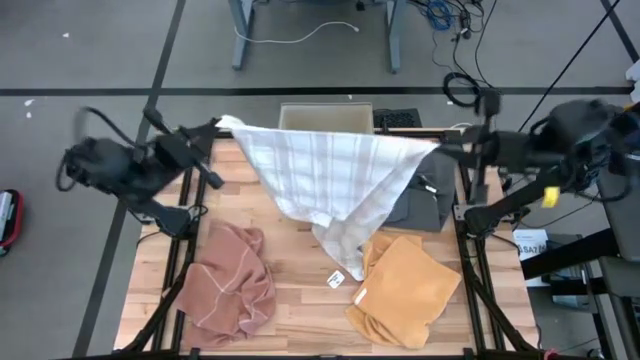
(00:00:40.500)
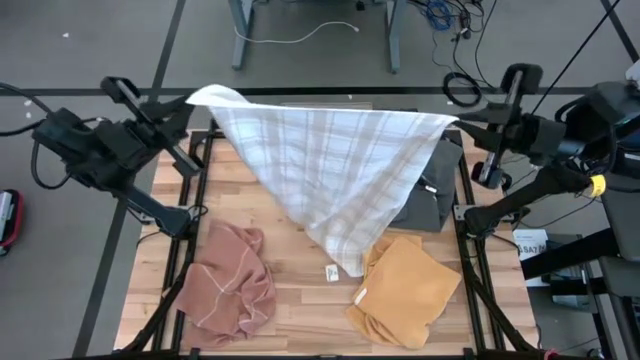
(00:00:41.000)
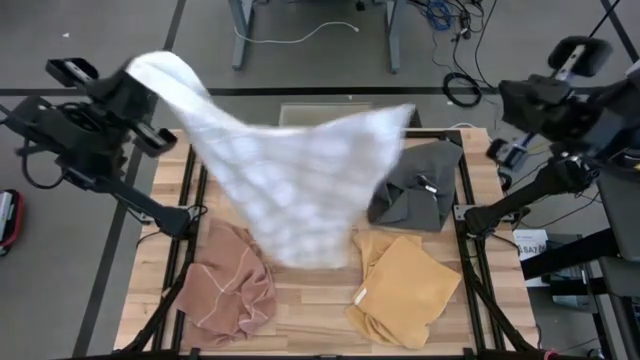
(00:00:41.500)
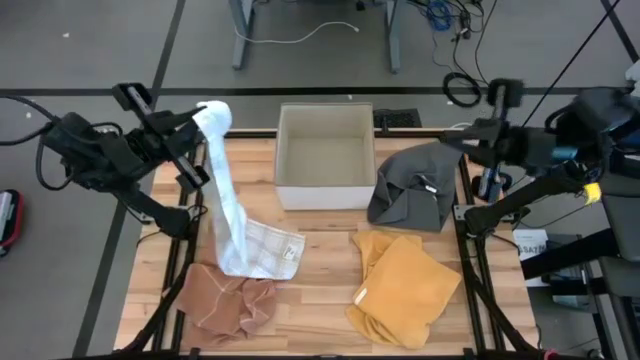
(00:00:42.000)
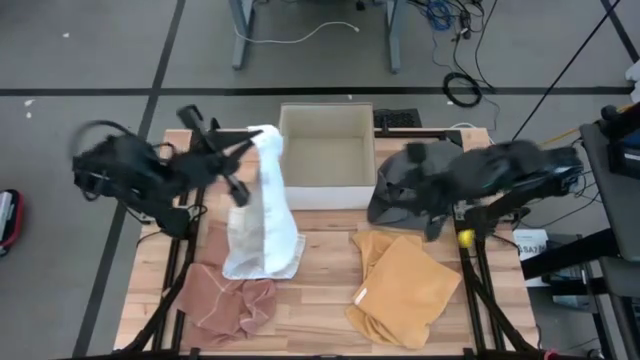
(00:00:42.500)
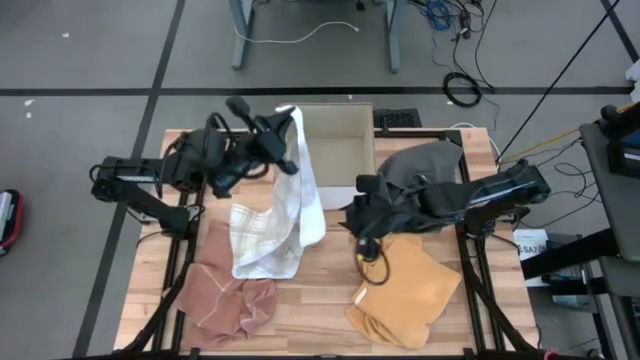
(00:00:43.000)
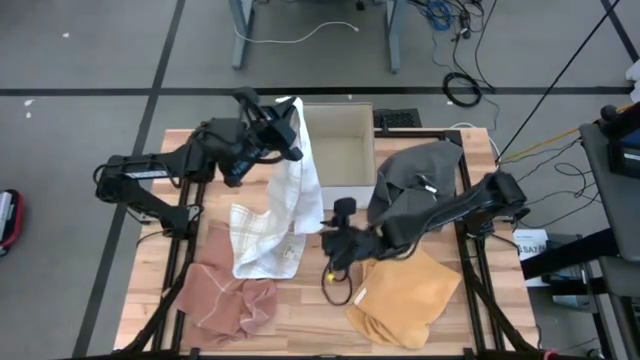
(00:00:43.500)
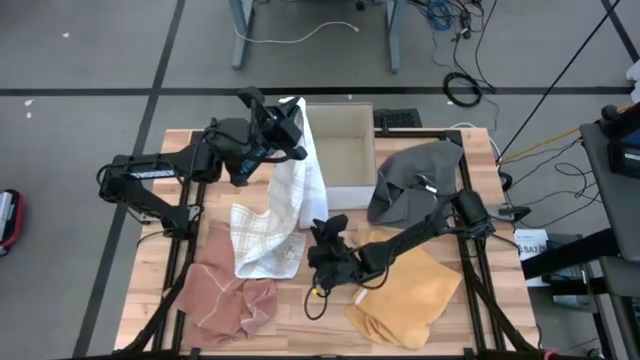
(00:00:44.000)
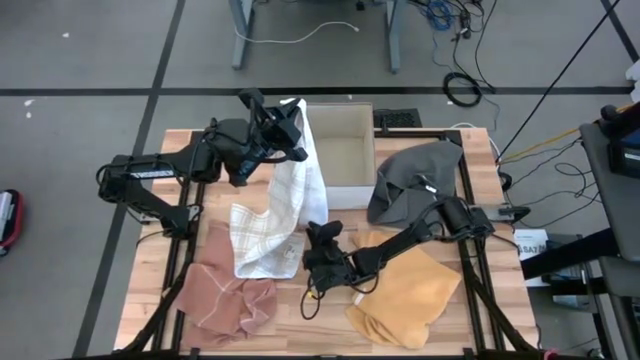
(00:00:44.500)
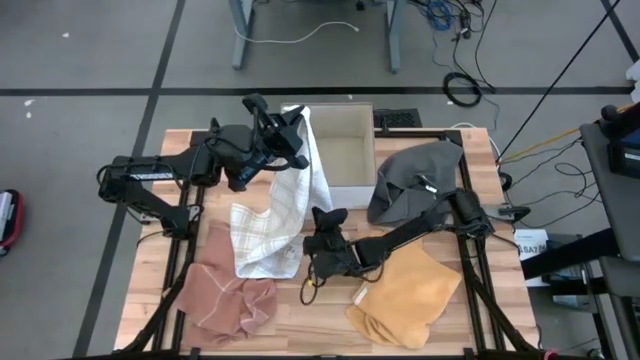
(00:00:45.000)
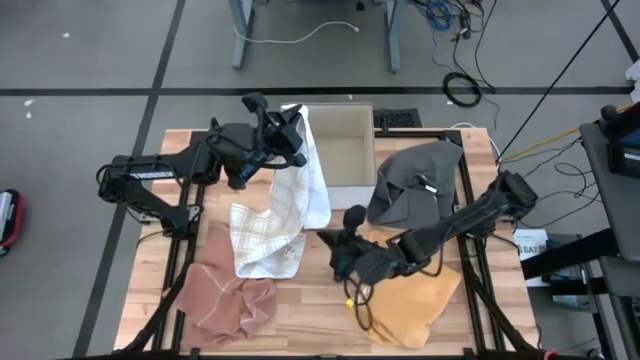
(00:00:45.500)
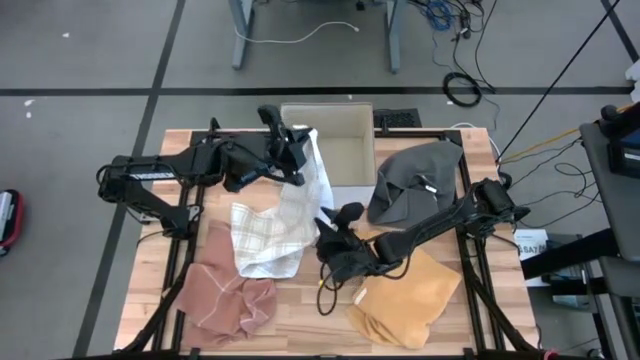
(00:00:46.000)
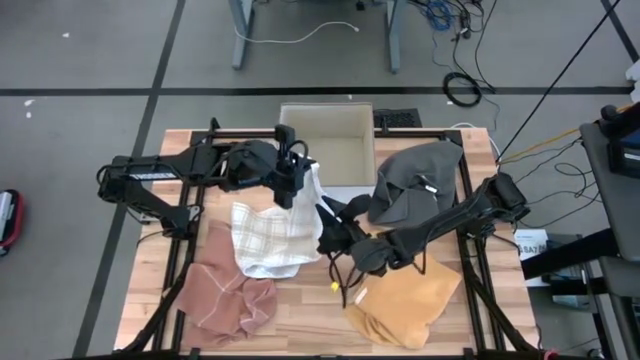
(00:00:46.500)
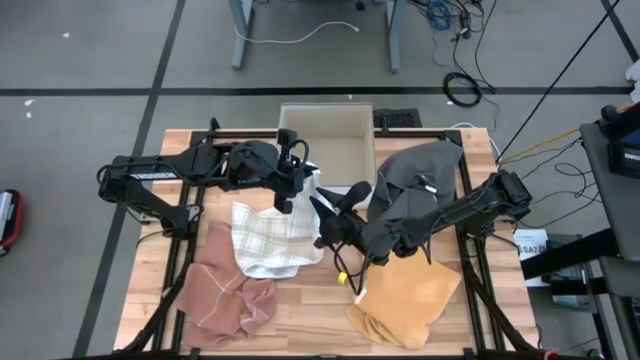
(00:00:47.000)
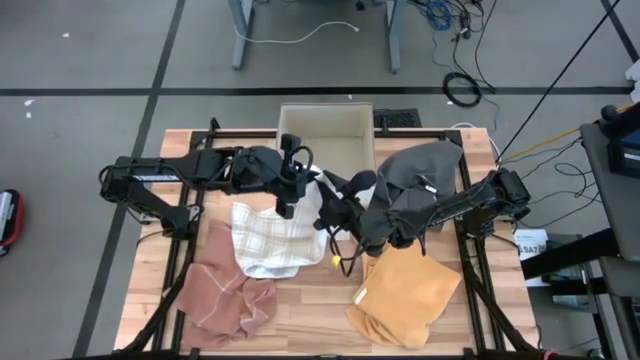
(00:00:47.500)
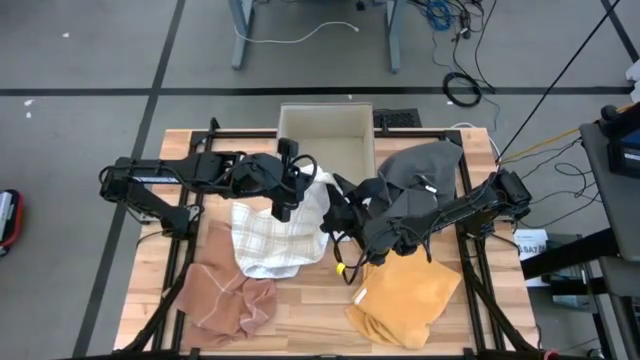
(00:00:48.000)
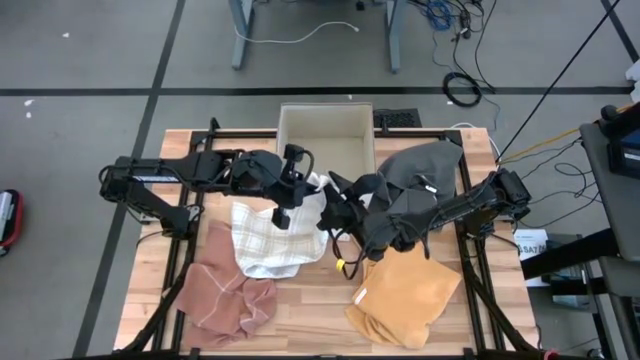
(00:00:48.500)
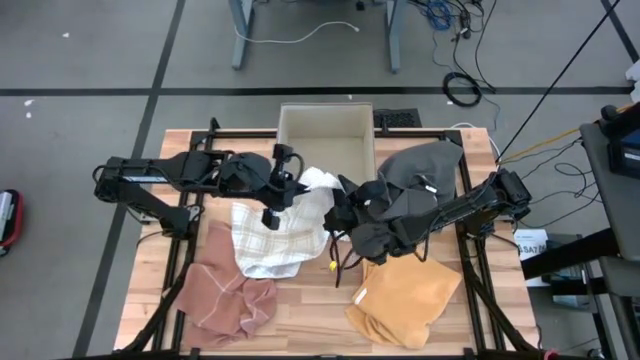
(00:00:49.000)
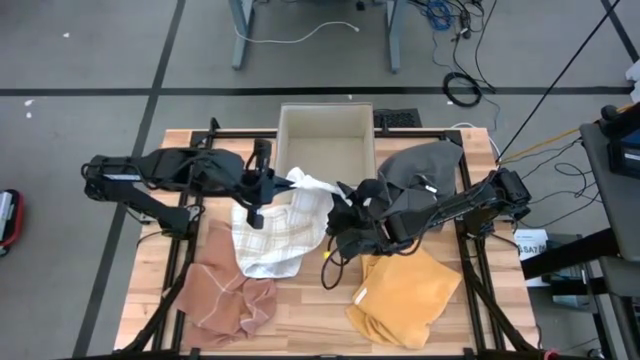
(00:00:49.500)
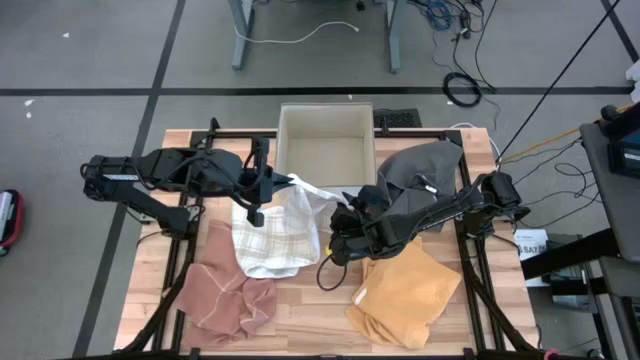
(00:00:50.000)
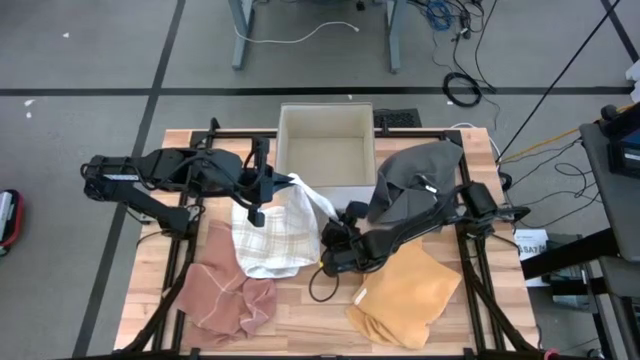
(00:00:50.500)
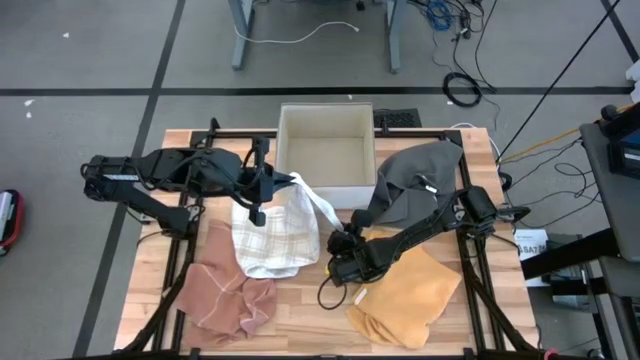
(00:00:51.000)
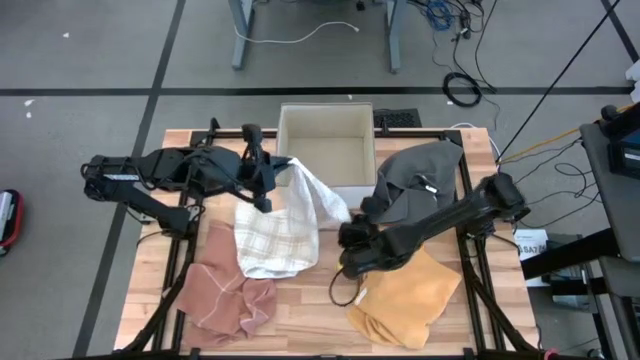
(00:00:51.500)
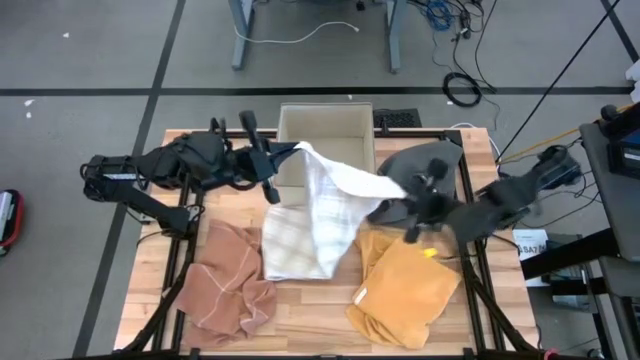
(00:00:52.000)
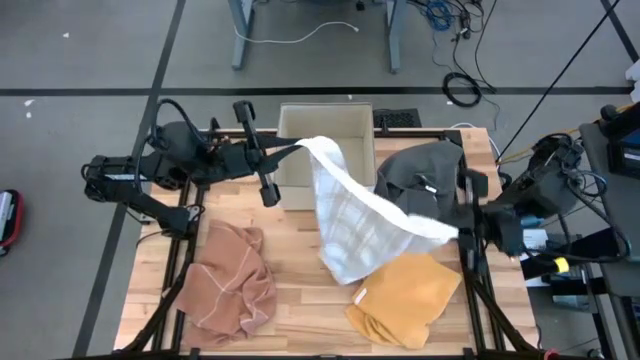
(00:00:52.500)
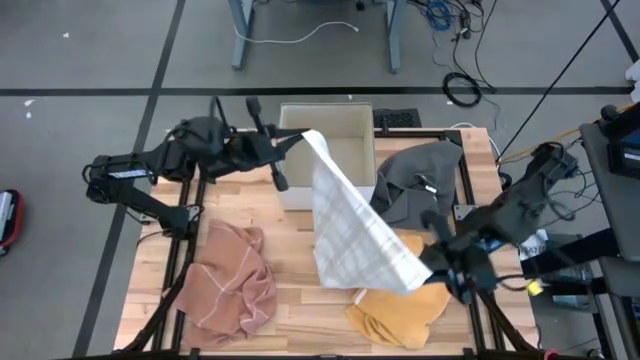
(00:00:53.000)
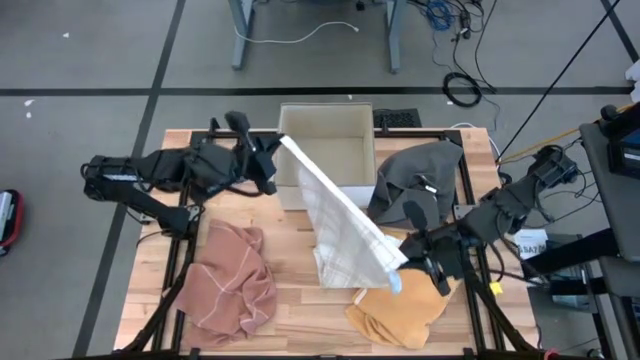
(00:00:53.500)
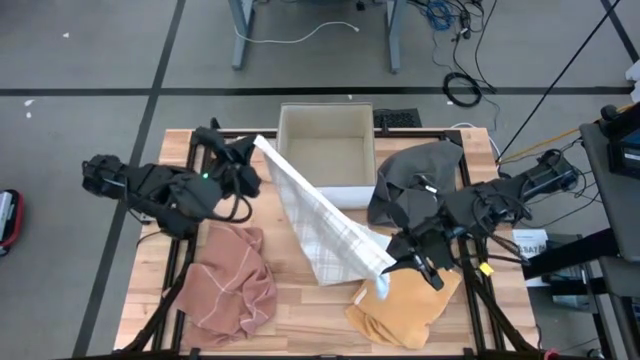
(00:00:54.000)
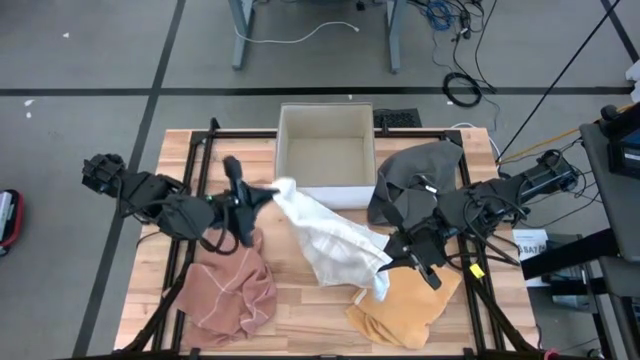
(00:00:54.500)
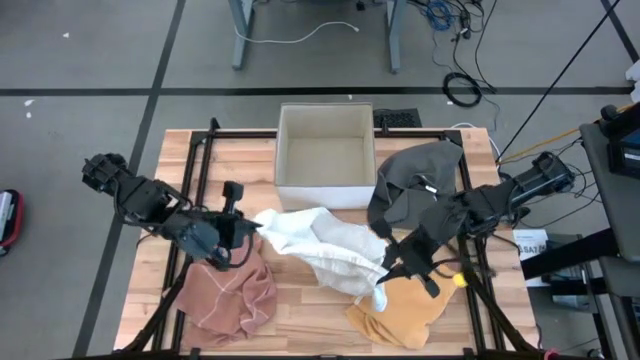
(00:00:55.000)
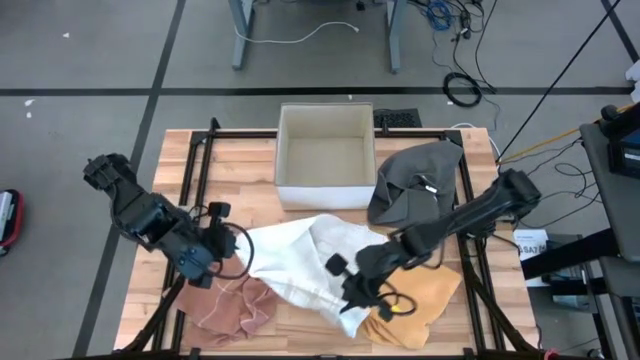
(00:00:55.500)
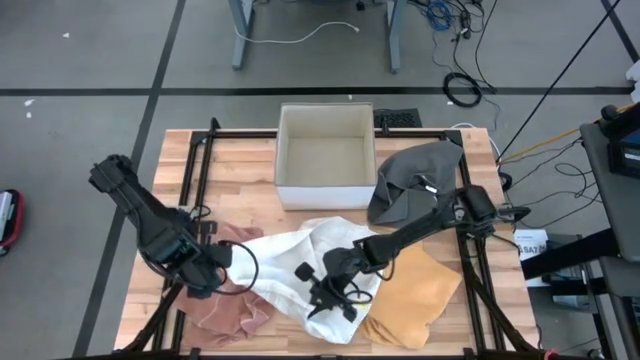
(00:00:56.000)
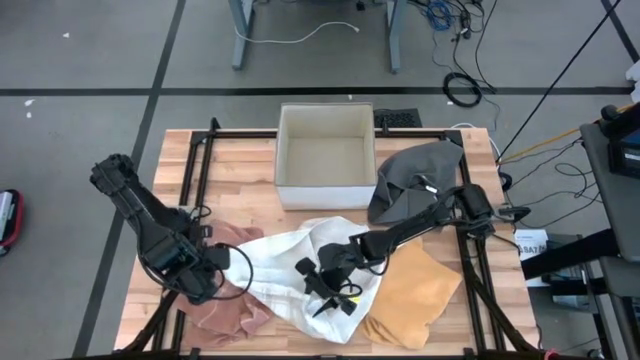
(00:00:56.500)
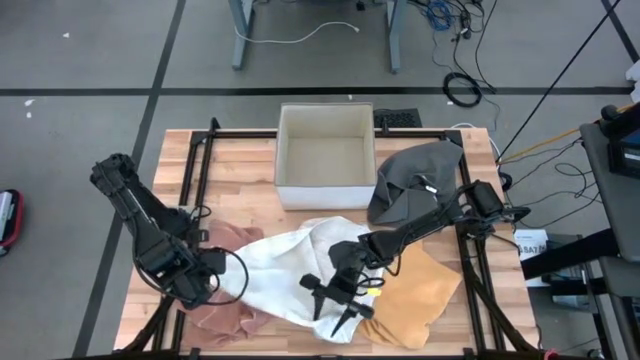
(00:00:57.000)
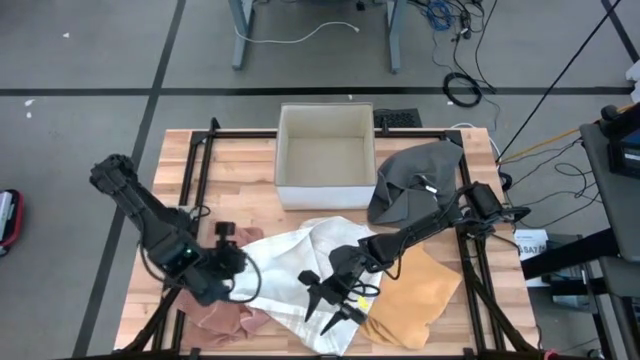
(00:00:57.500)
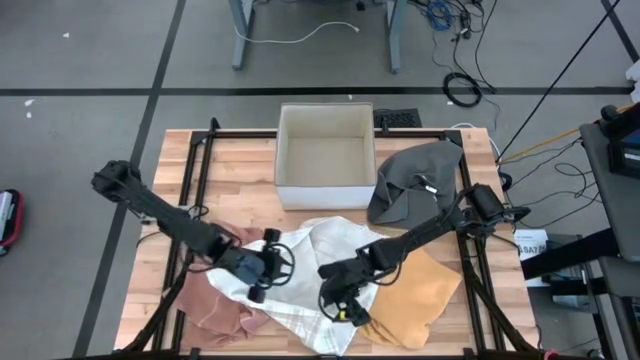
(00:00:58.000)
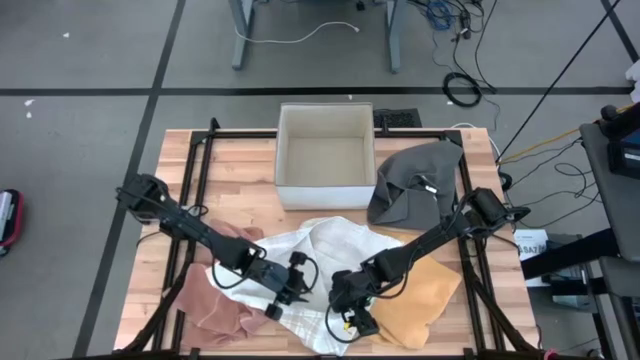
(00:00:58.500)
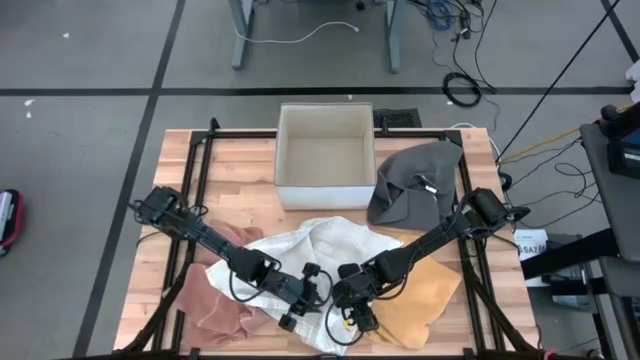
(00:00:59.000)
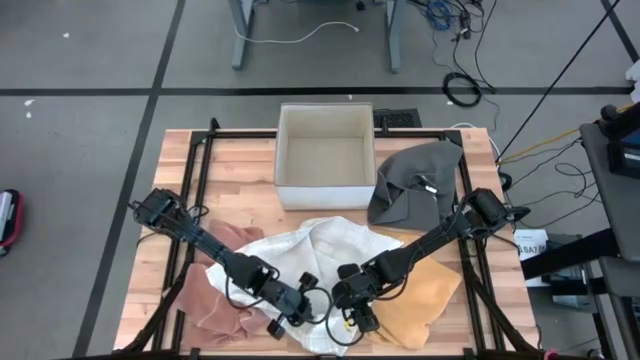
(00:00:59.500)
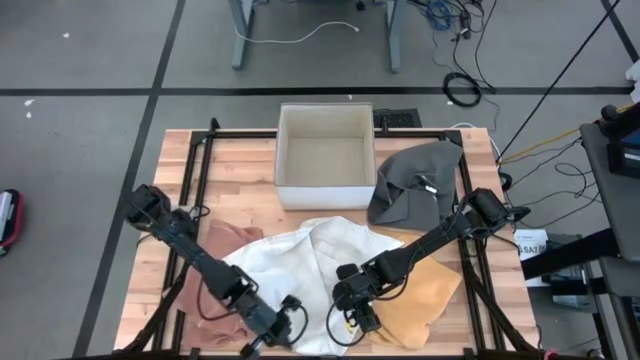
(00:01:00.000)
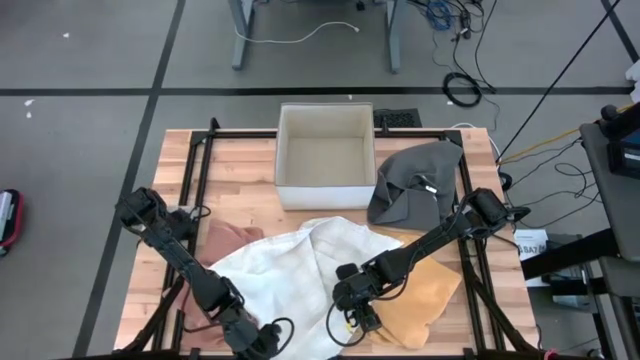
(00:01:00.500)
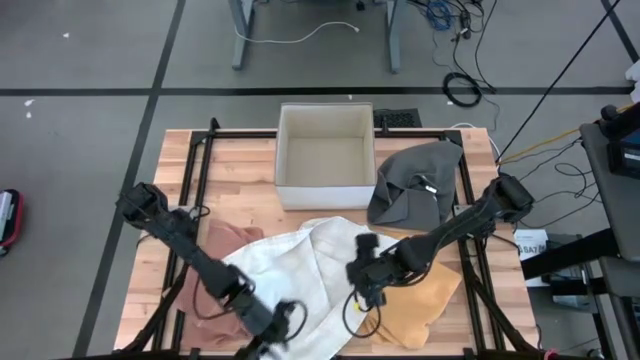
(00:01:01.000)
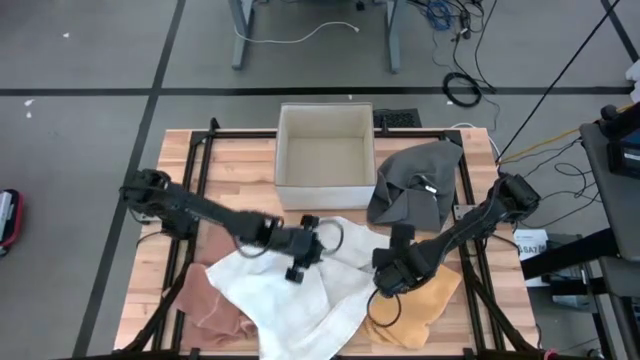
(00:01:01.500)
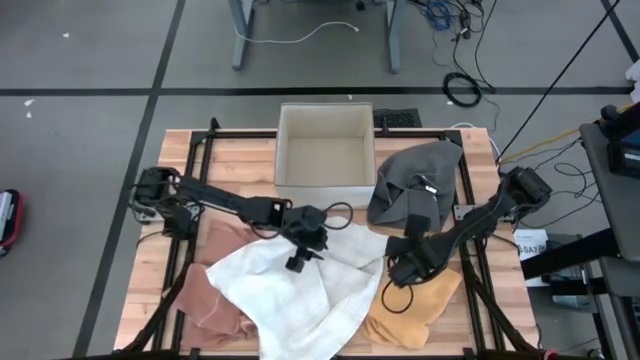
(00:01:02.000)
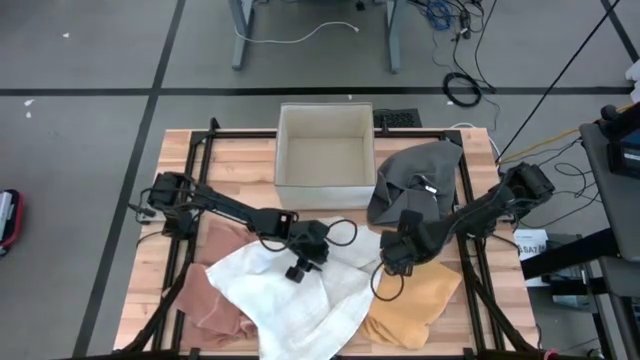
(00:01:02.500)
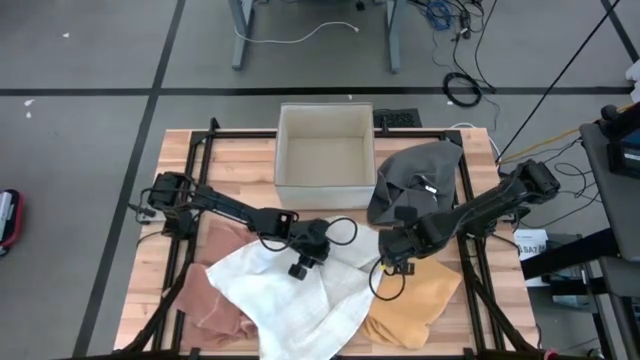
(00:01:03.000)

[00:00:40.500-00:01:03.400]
Task: Fold towel
Fold the white patterned towel
